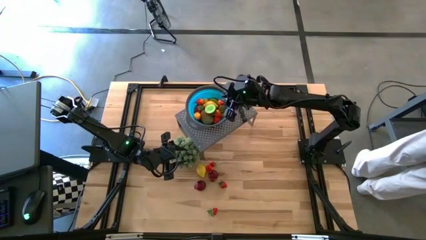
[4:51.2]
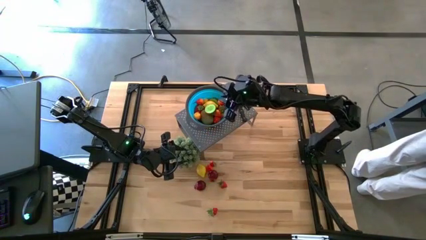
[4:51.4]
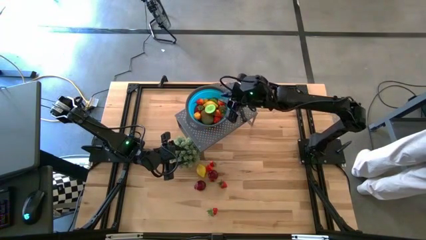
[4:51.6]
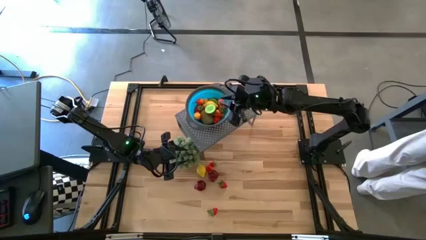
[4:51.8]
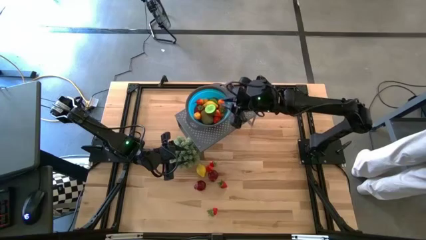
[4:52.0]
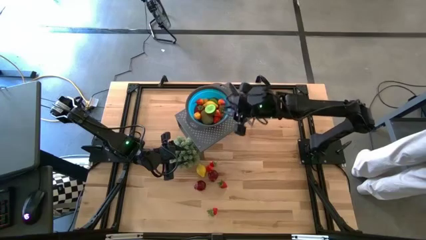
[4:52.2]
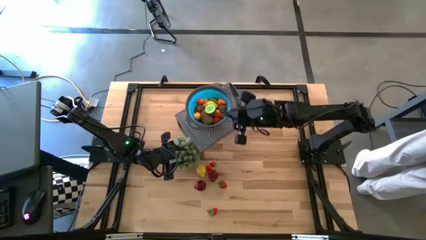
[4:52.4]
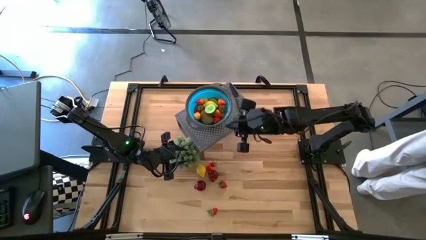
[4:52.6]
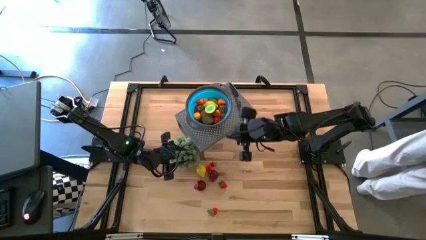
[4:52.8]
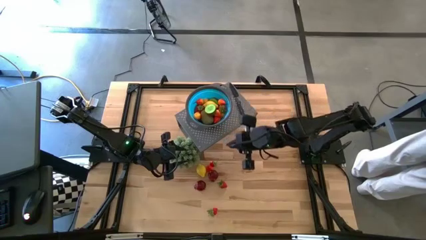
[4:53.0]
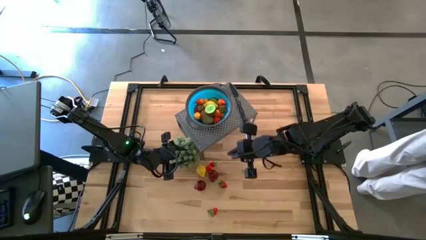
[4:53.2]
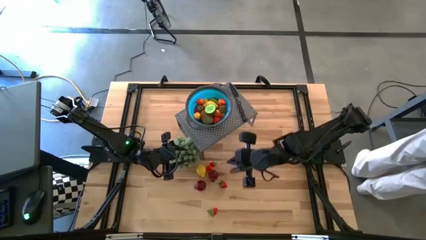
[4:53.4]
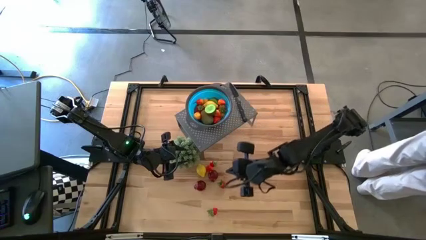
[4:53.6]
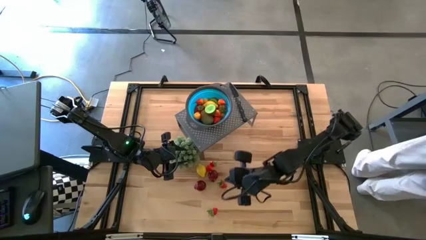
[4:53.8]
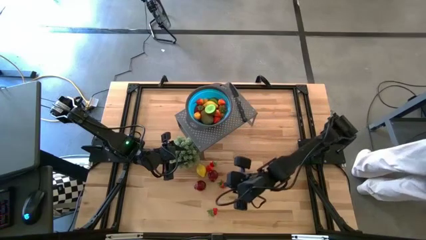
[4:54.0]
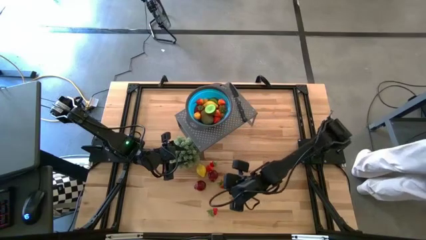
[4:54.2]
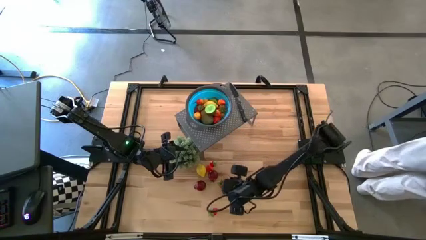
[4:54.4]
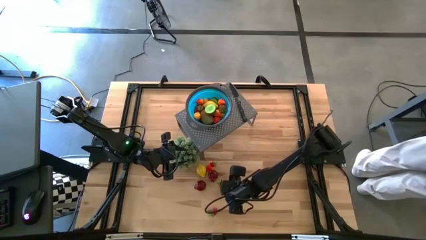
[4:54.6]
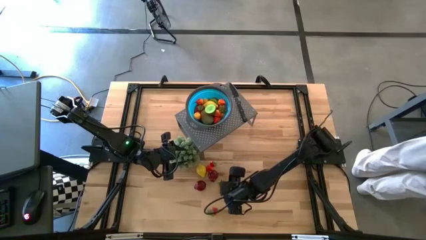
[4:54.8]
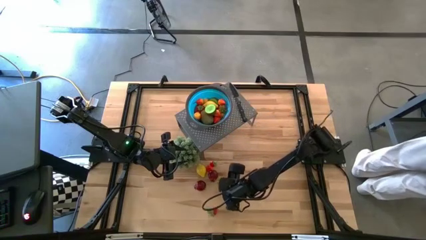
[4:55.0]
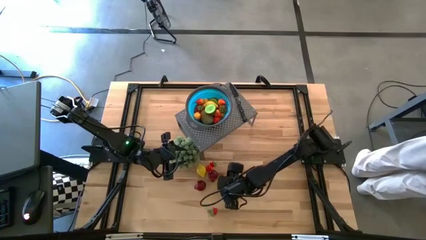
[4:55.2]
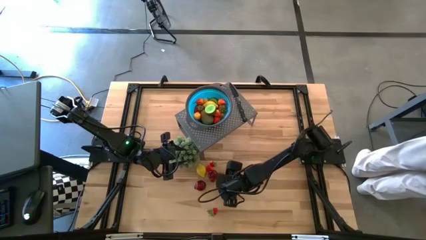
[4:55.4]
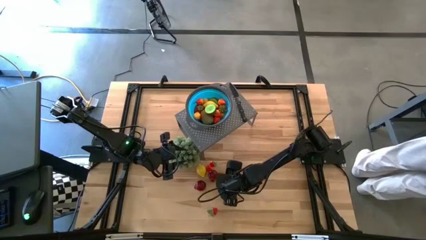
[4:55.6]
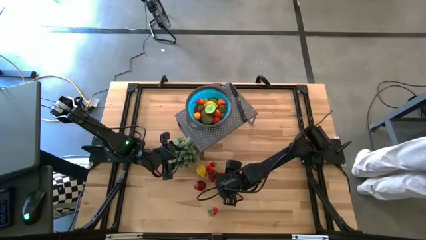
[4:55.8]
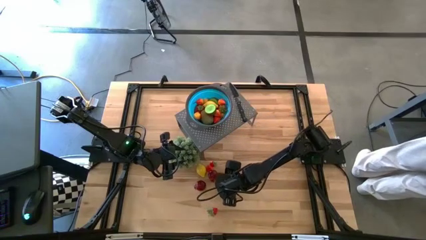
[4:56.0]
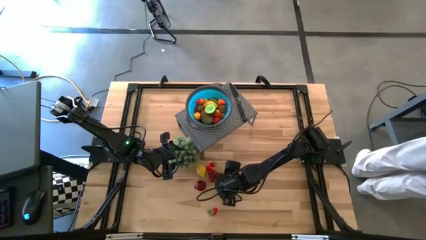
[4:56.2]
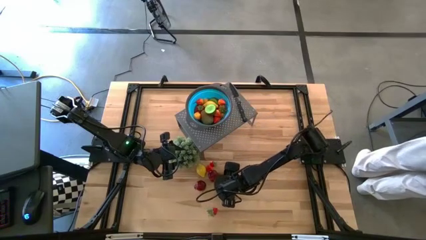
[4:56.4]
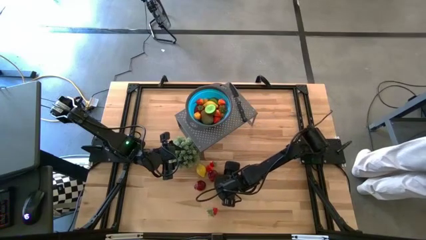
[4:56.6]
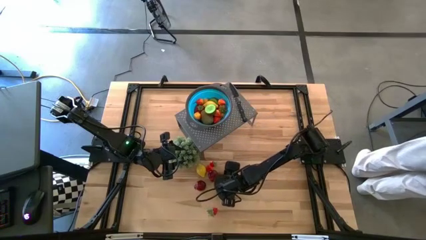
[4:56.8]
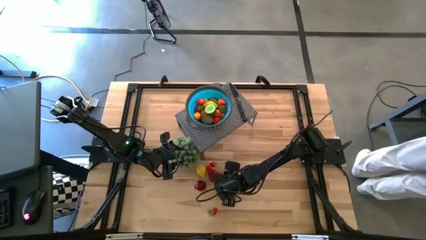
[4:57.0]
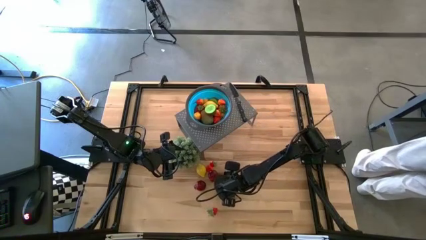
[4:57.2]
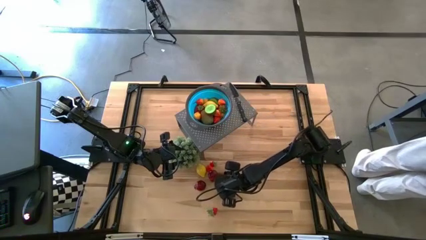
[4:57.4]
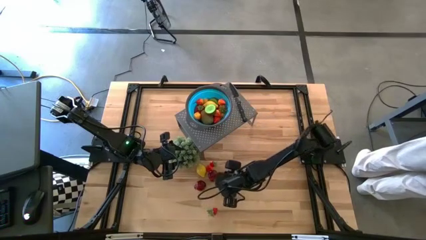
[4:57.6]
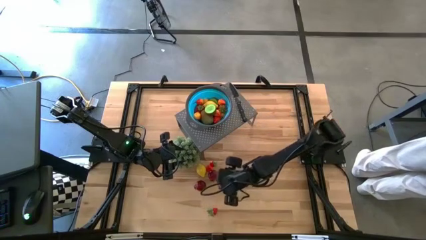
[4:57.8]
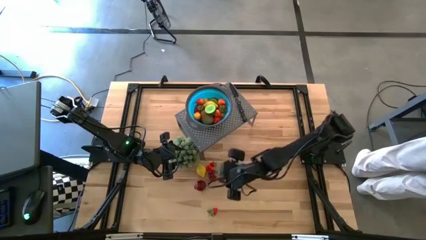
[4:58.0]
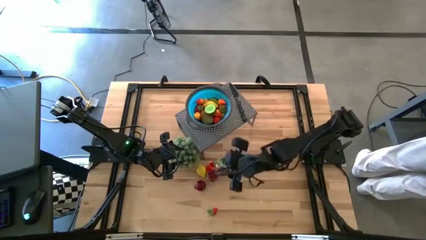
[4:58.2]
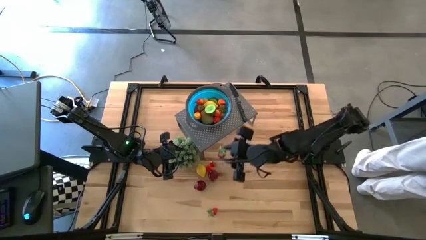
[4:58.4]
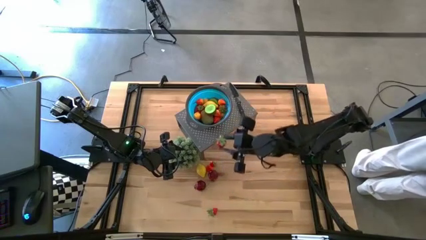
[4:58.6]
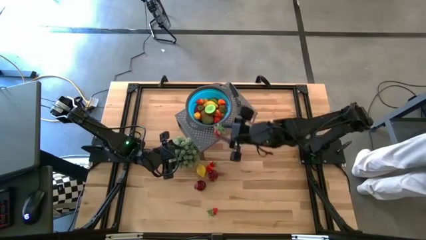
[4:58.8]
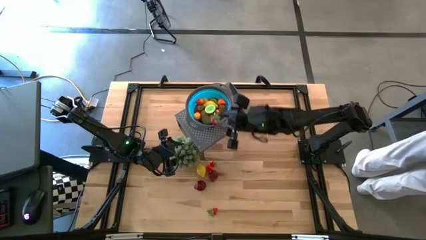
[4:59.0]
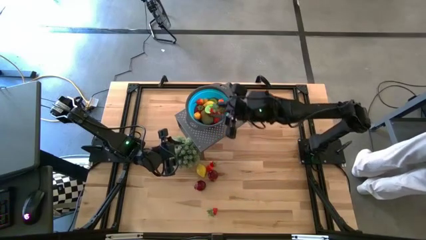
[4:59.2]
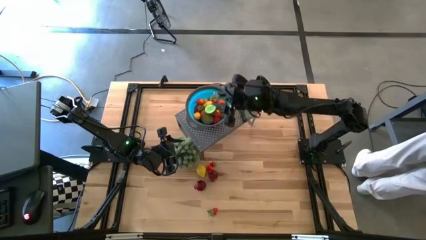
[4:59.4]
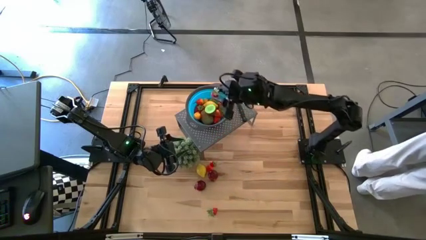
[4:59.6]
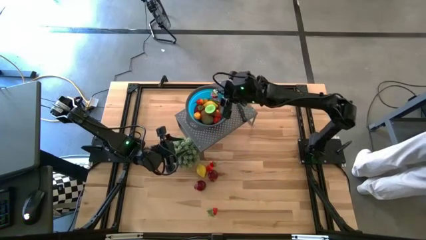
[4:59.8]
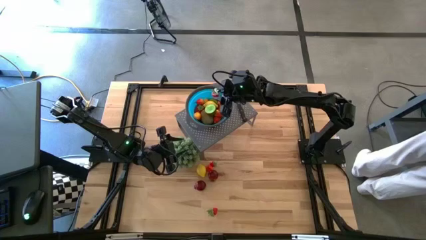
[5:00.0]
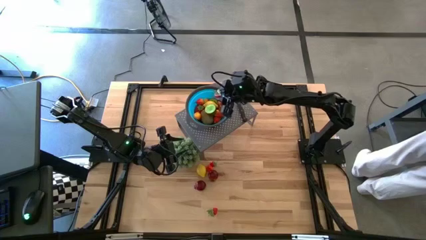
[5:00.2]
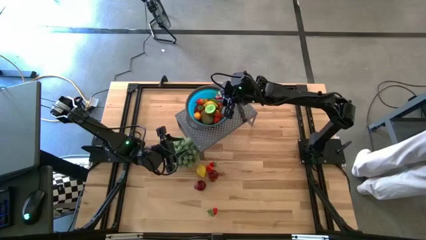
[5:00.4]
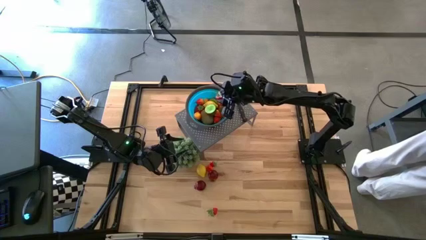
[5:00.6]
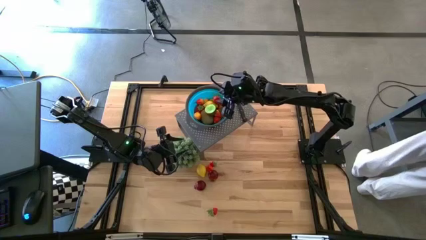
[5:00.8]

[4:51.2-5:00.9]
Task: Pick & Place Fruit
Put the strawberry into the blue strainer bowl on the shelf
